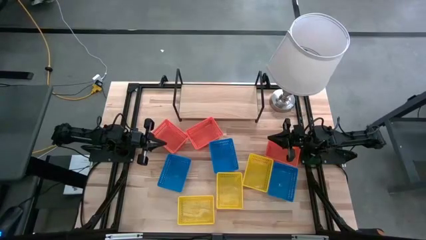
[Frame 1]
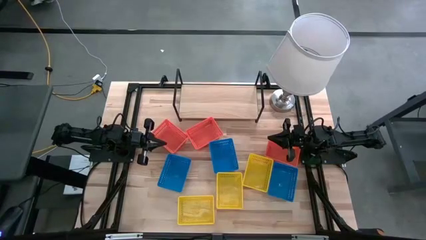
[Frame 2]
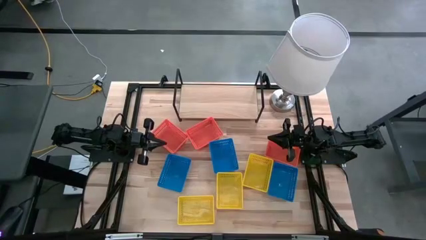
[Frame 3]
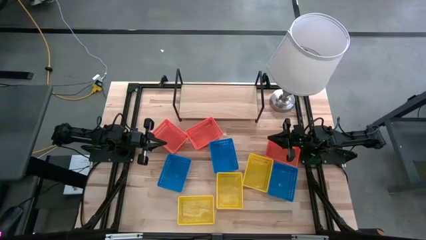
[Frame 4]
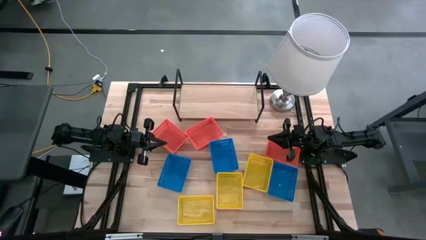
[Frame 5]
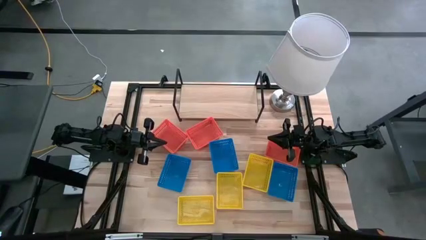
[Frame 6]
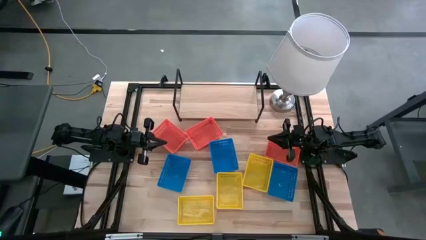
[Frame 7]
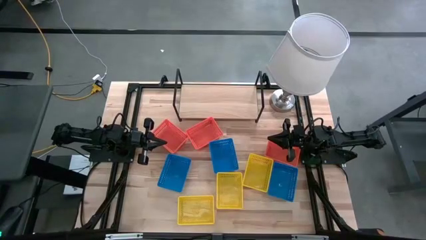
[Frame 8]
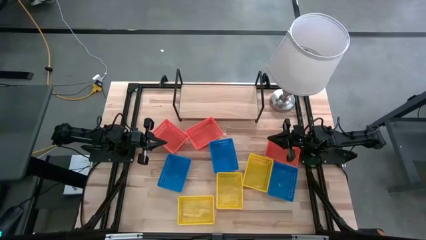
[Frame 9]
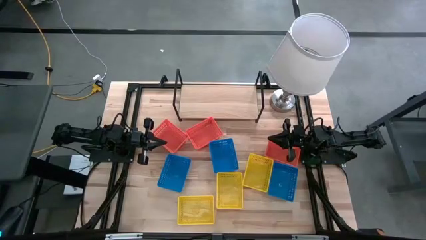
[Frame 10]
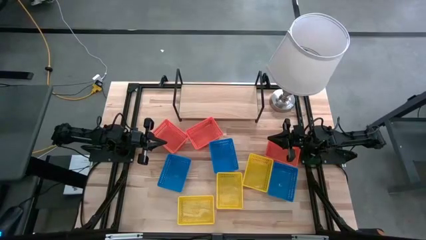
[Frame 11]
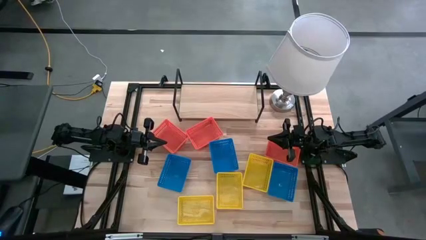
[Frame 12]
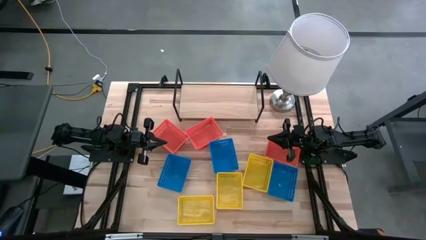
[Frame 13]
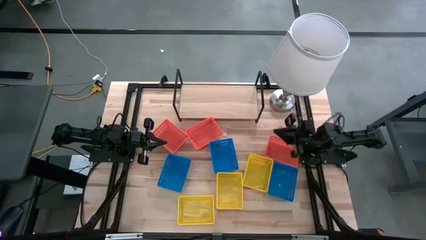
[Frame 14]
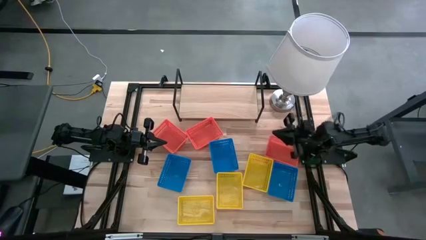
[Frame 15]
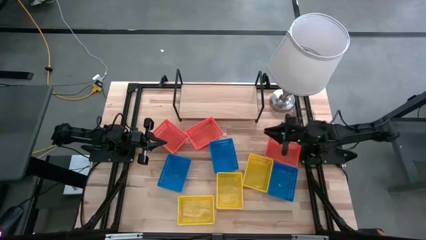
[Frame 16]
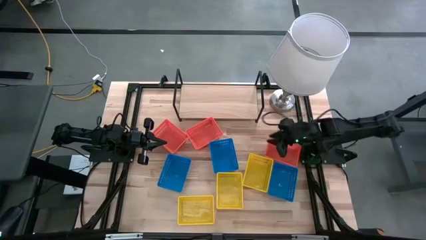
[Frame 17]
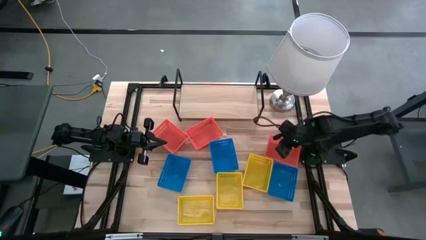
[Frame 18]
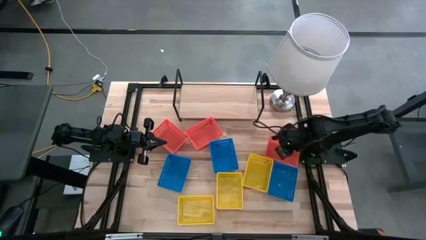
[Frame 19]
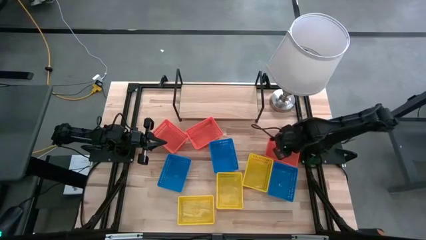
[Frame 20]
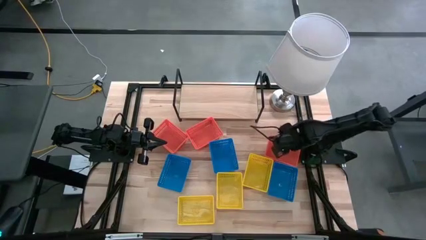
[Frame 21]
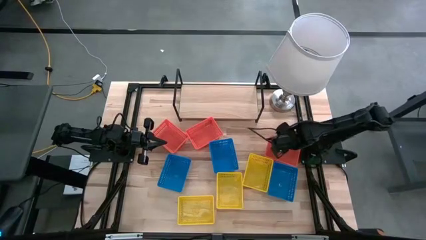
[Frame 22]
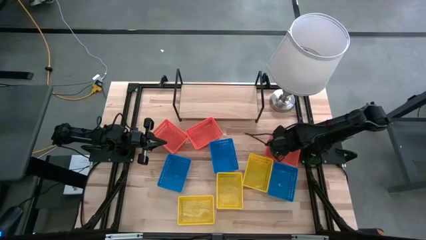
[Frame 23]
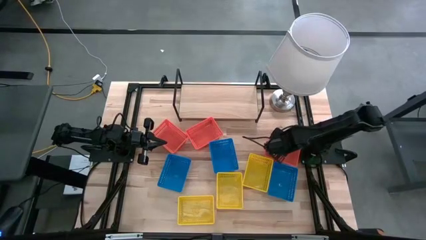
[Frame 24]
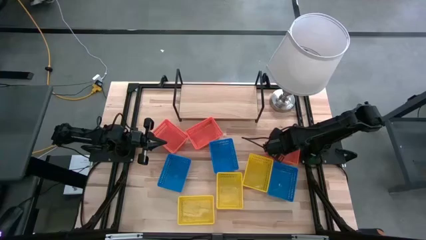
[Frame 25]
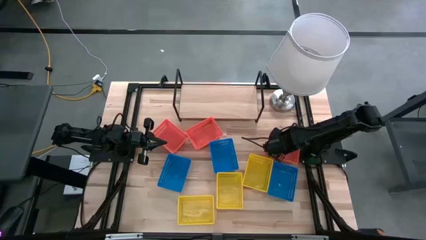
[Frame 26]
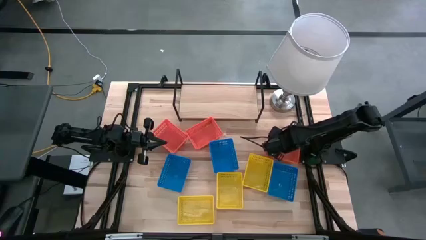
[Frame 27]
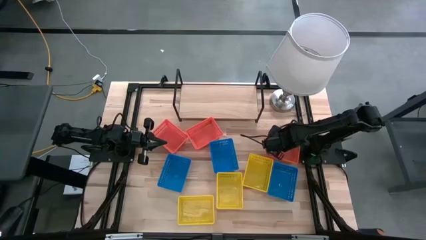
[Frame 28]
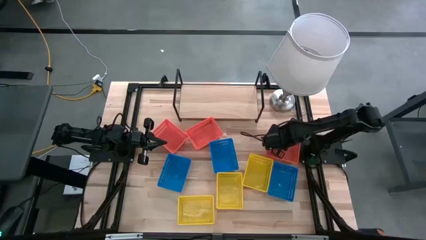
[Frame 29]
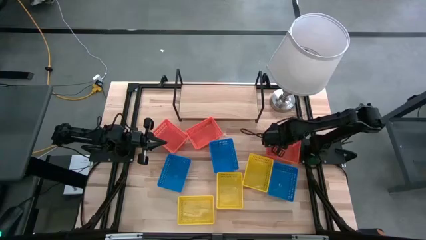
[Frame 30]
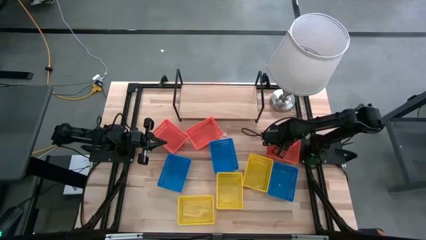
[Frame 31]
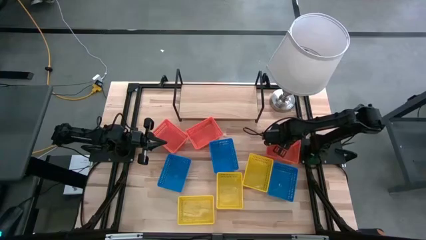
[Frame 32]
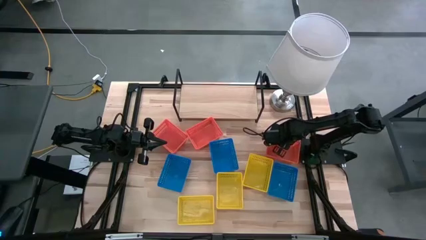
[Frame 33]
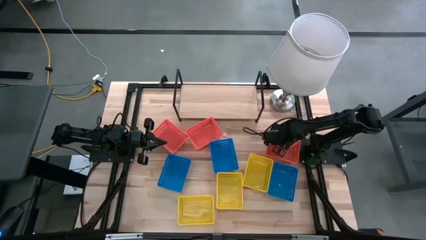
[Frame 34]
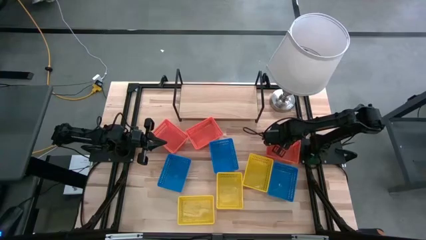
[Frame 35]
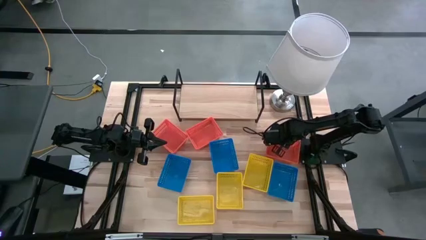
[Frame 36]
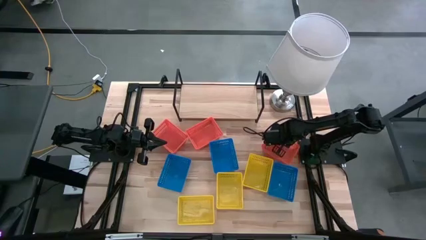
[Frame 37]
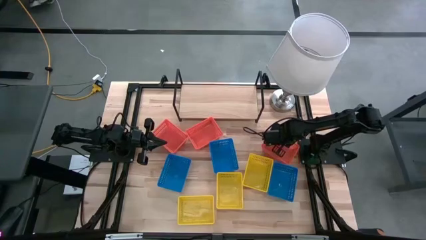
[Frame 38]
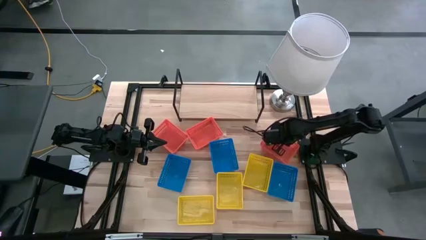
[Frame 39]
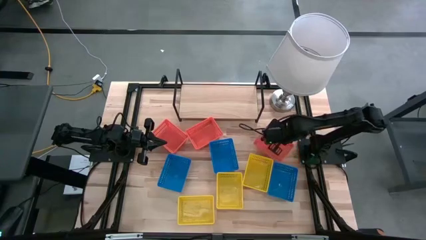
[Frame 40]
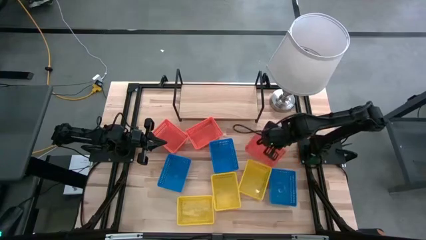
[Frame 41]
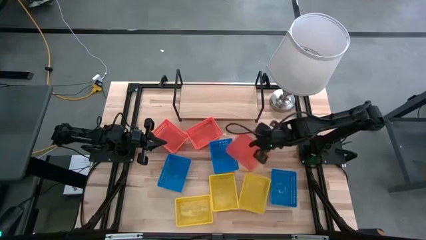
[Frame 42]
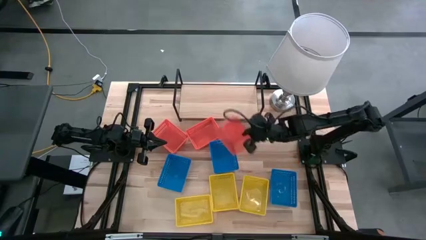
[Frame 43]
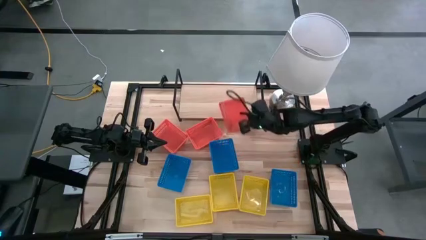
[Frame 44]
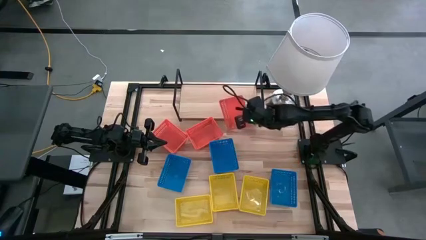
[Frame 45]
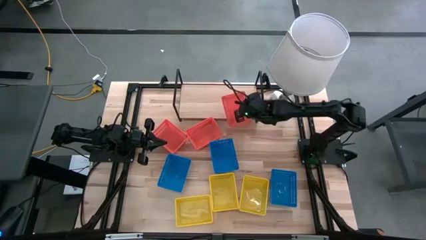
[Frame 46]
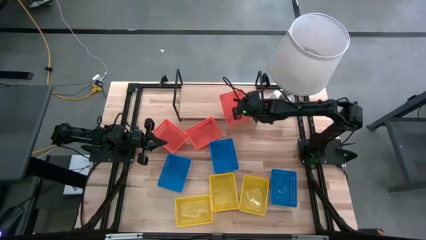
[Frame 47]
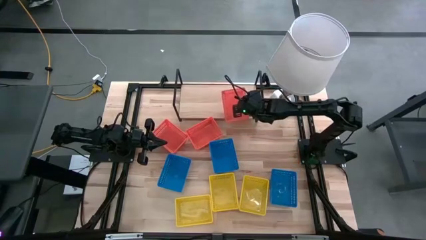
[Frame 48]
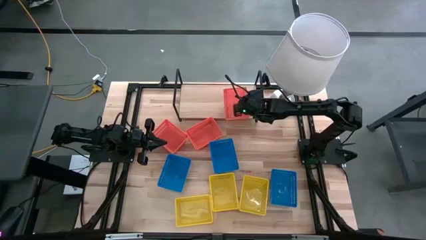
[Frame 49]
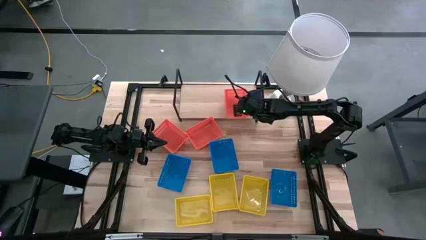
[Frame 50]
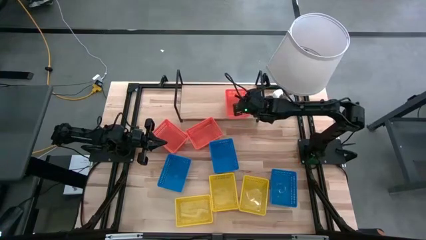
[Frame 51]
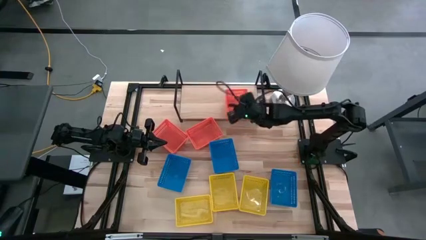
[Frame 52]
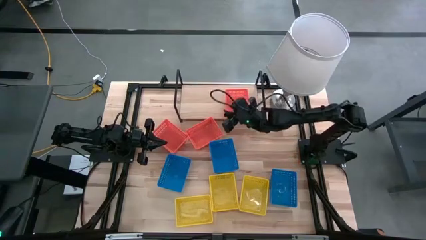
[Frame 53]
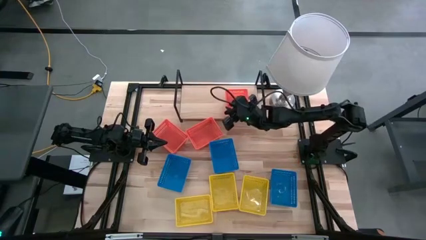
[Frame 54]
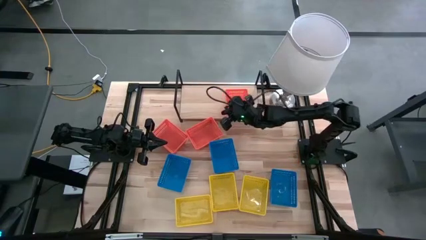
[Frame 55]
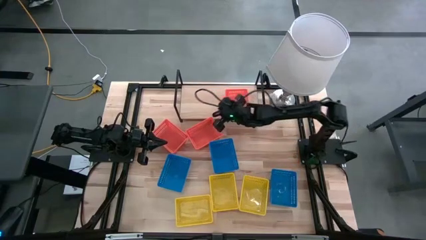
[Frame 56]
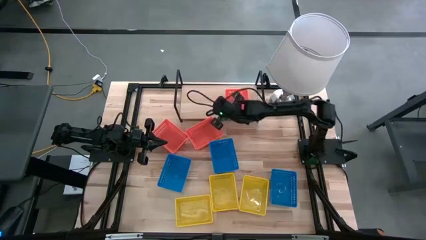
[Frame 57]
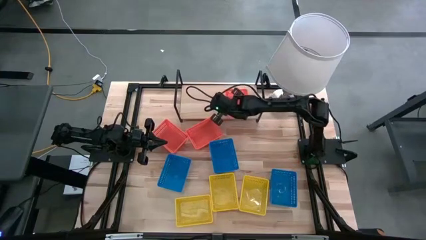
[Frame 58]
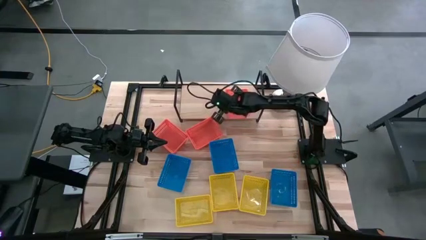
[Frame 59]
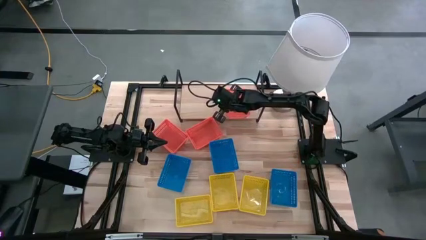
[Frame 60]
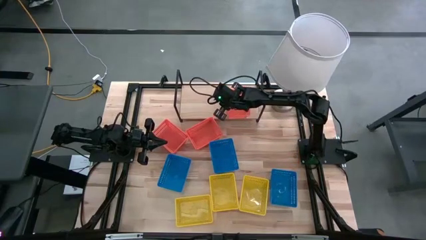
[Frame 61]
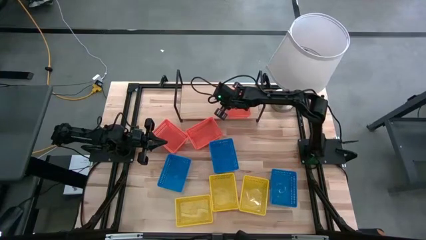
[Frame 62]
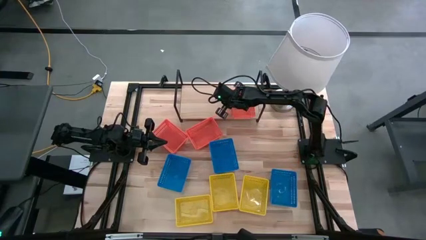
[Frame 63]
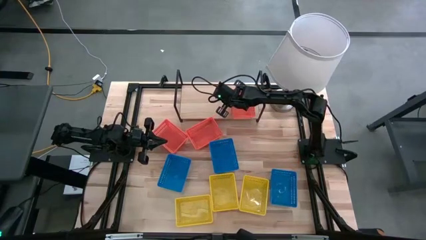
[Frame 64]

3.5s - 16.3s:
Task: Stack baskets on shelf by color
Put the right orange bin on the shelf
